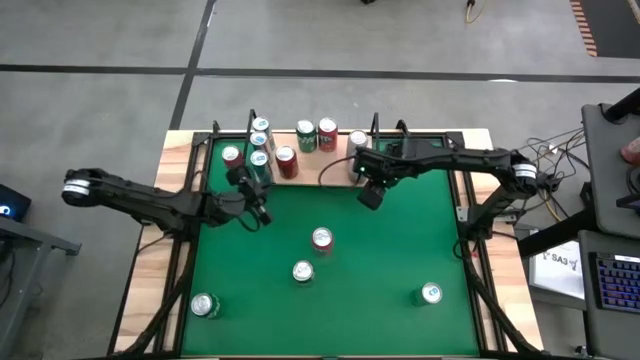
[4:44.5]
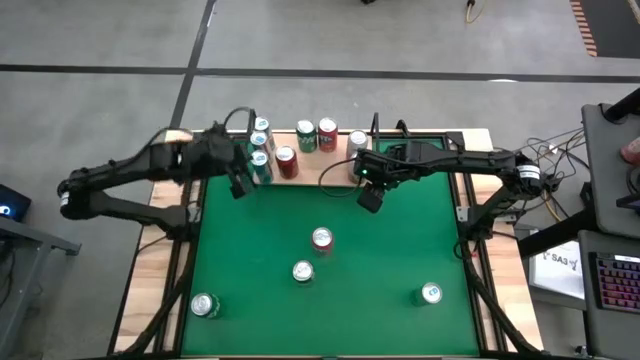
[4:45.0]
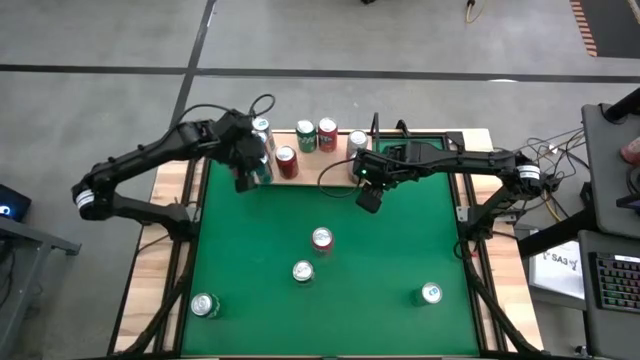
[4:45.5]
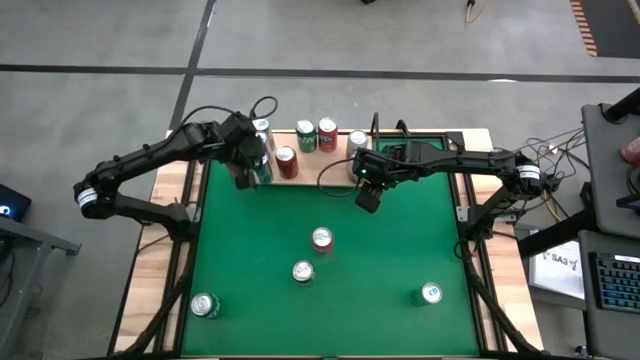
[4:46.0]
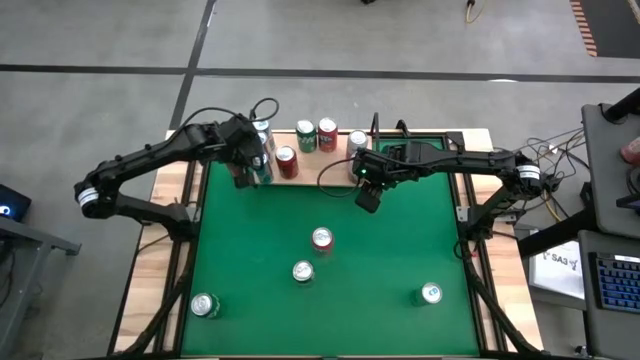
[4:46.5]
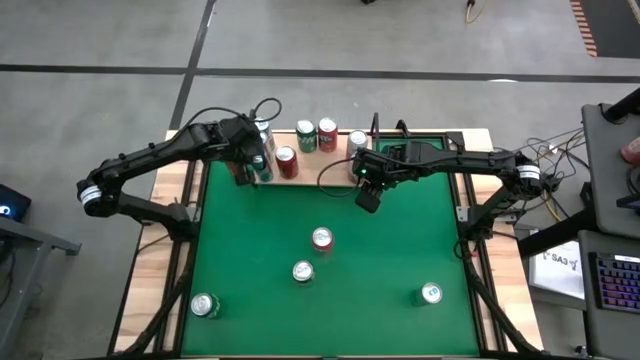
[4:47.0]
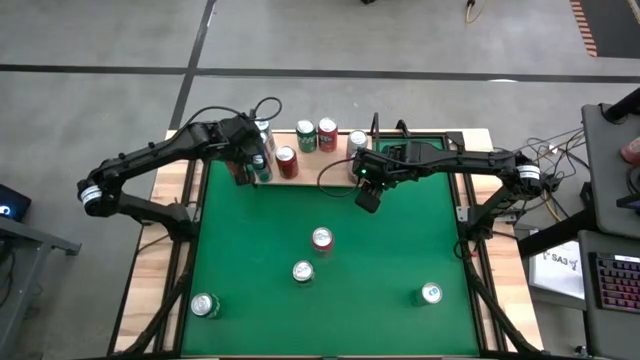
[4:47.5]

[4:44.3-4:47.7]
Task: Pick and place cans onto a shelf
Adjust the blue silver soda can

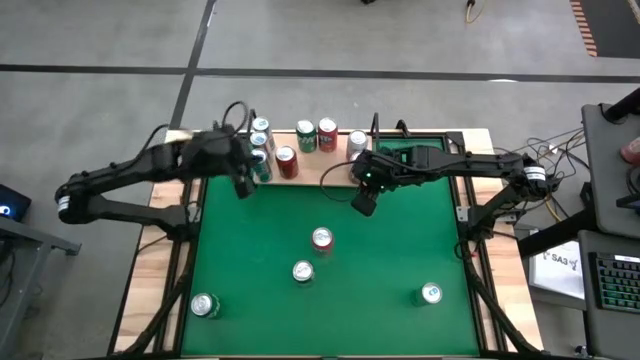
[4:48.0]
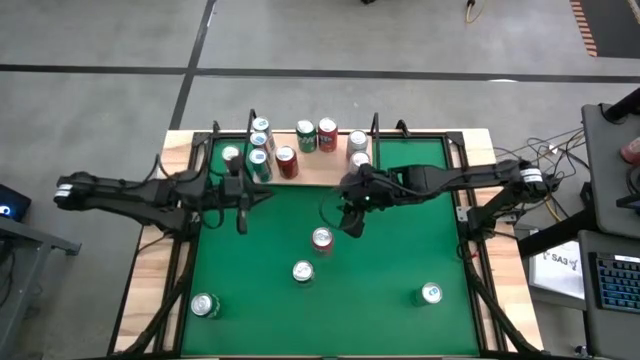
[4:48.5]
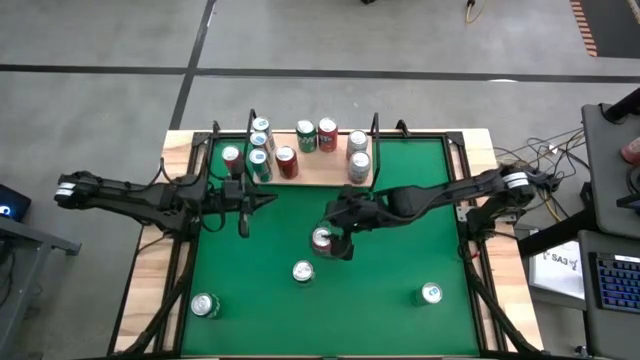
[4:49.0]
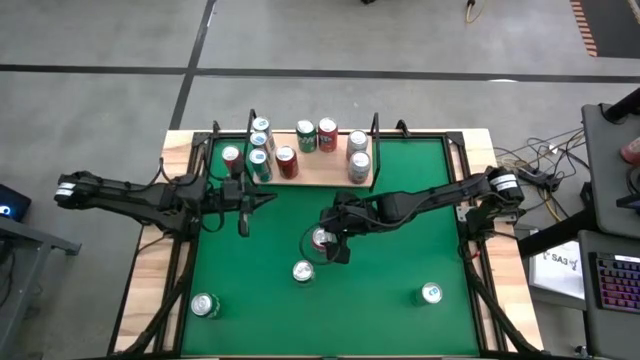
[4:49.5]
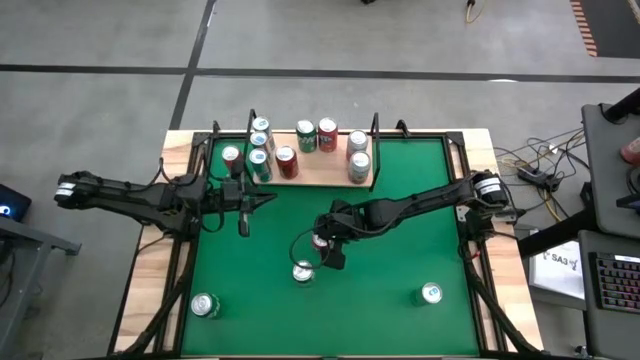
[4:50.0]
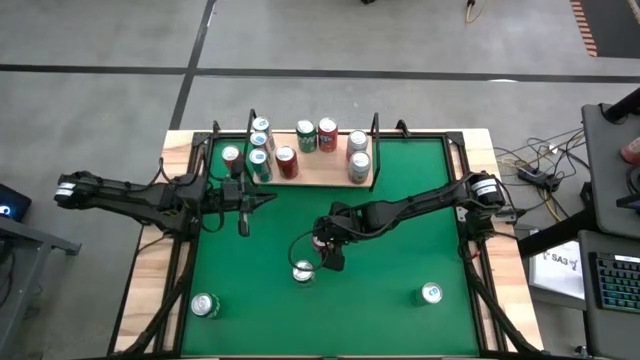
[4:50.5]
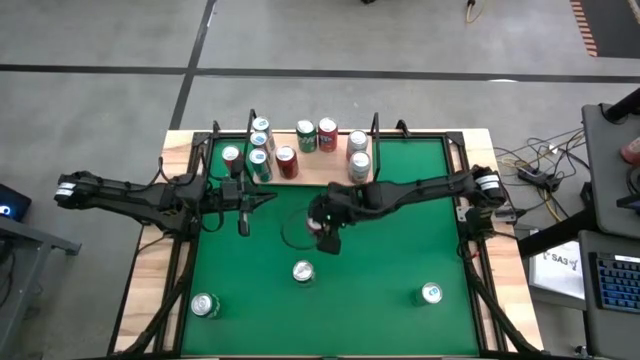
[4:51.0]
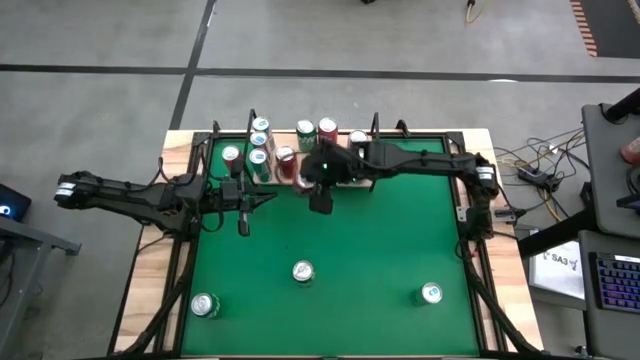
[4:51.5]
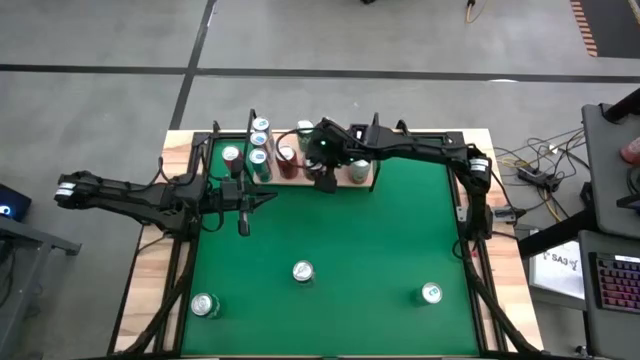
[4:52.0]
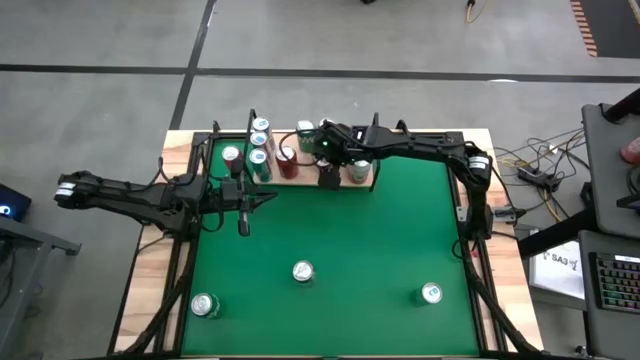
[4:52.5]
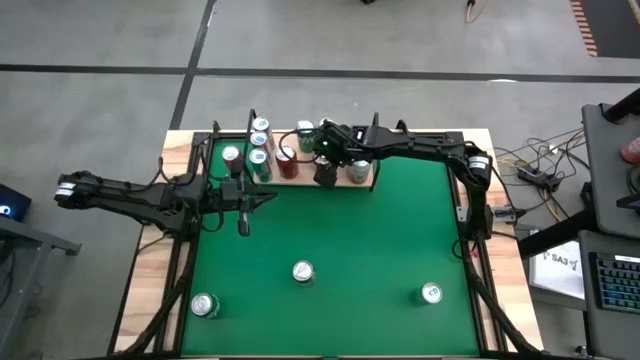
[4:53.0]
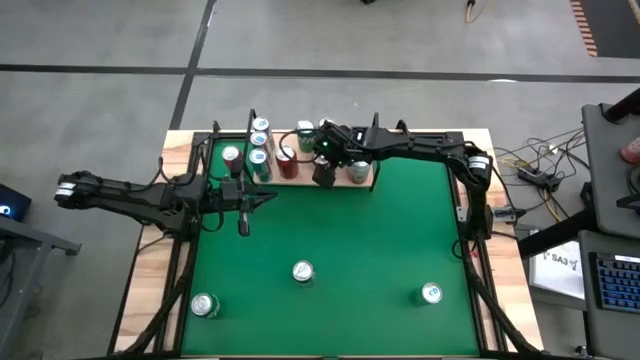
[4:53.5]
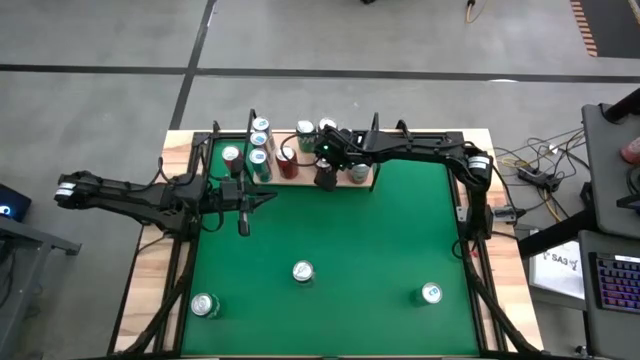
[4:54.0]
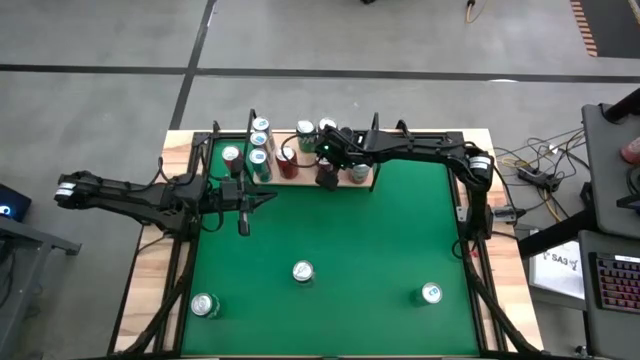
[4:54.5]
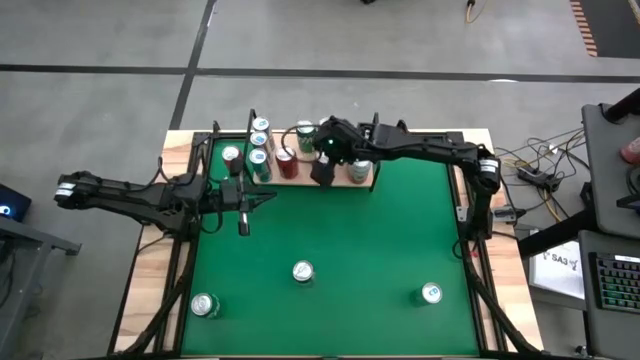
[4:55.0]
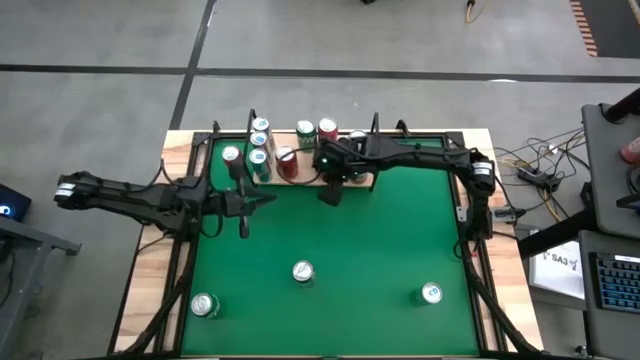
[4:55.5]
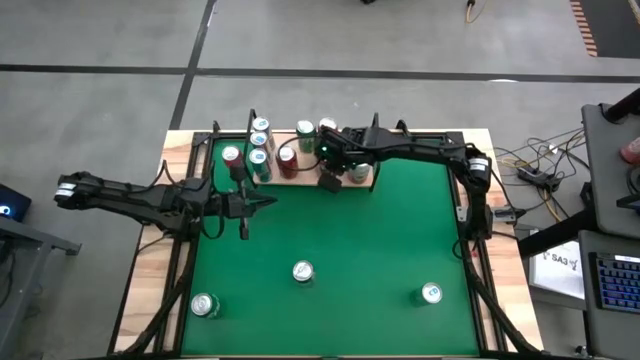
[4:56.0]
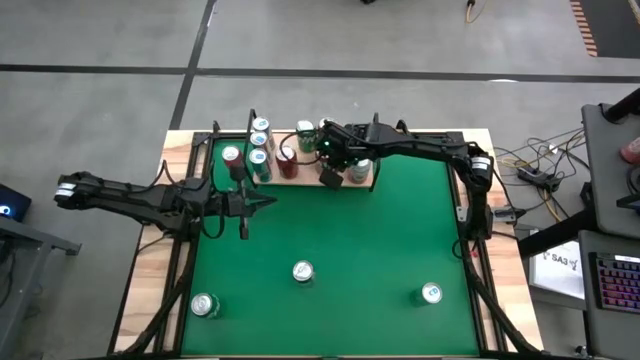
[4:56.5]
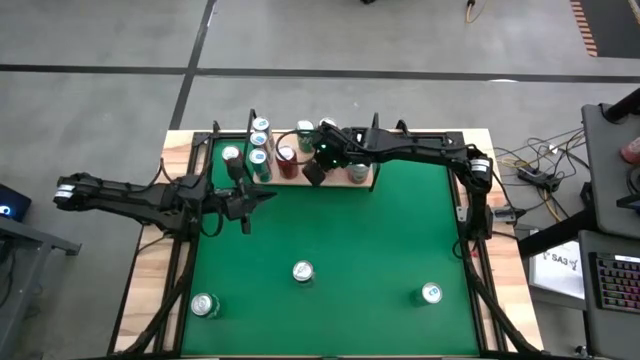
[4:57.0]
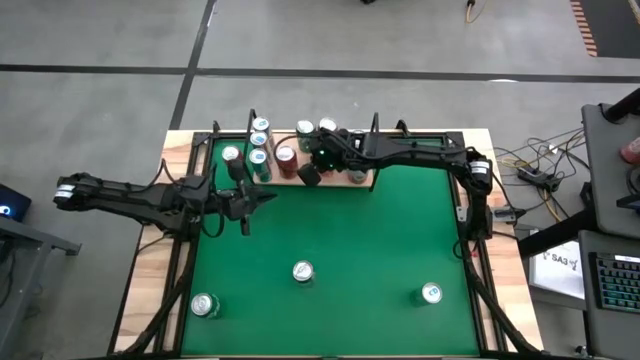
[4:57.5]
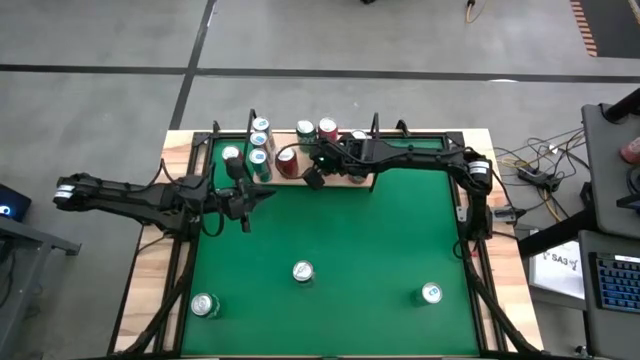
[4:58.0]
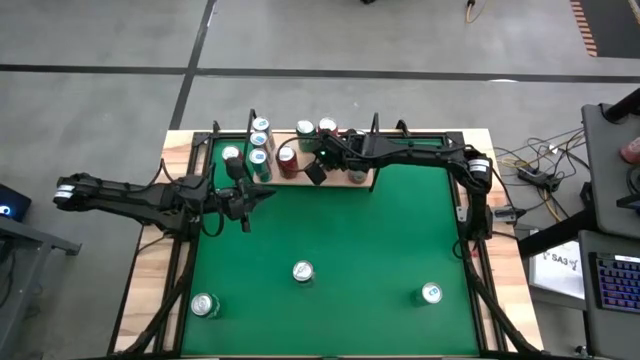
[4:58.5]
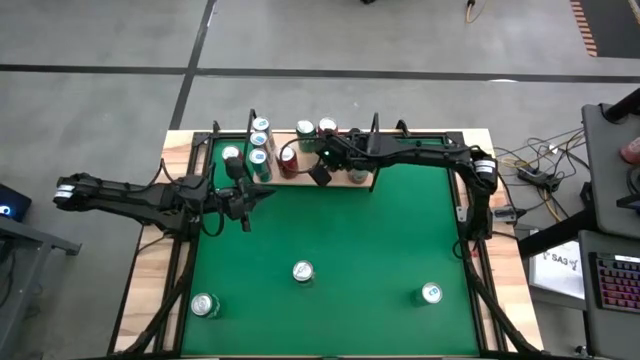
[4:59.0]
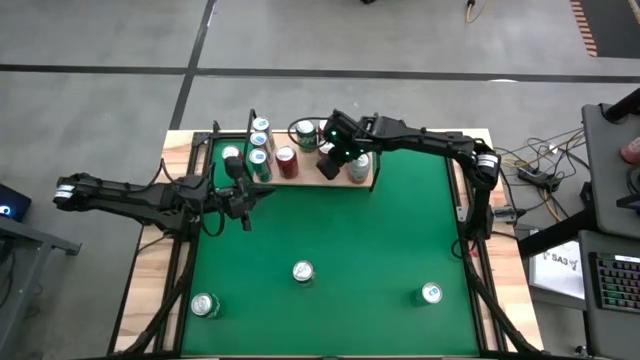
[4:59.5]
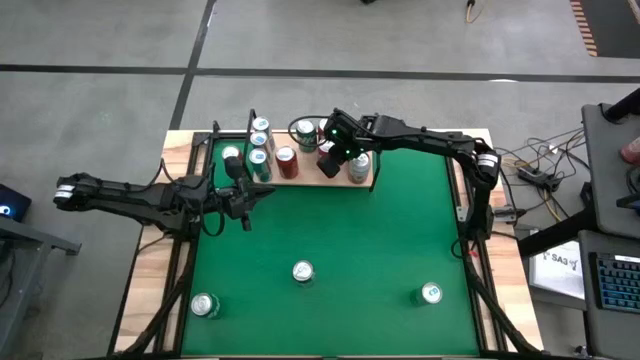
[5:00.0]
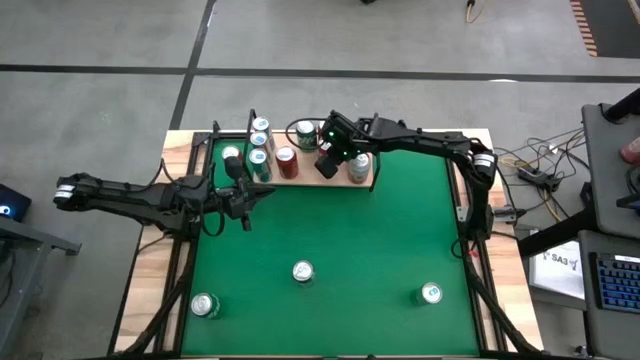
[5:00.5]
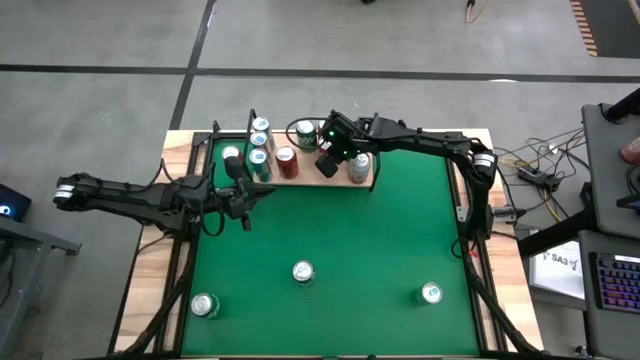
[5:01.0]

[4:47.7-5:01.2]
Put the bottom orange soda can on the shelf aligned with the other orange soda can

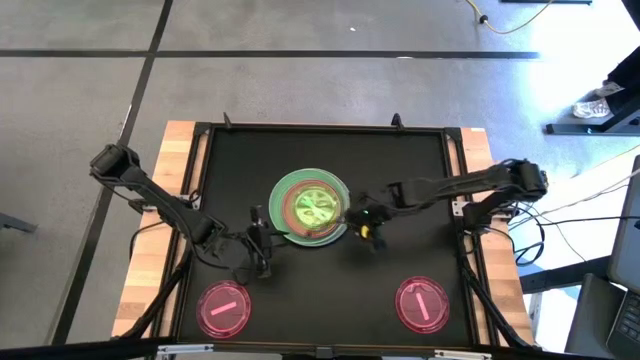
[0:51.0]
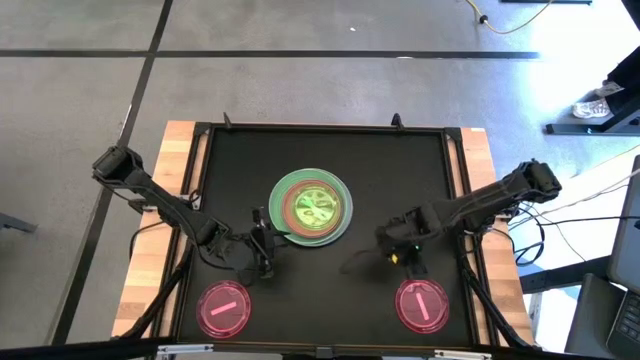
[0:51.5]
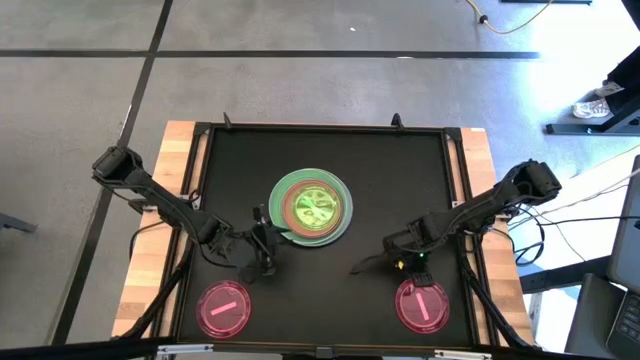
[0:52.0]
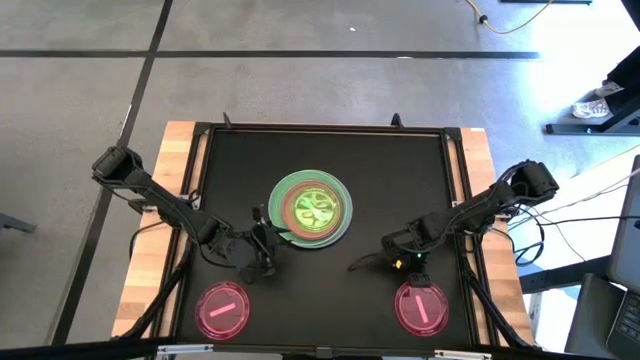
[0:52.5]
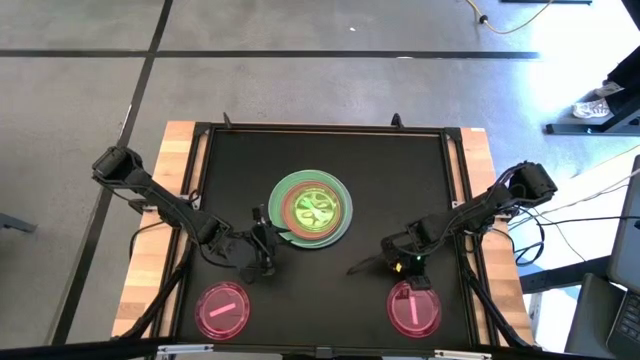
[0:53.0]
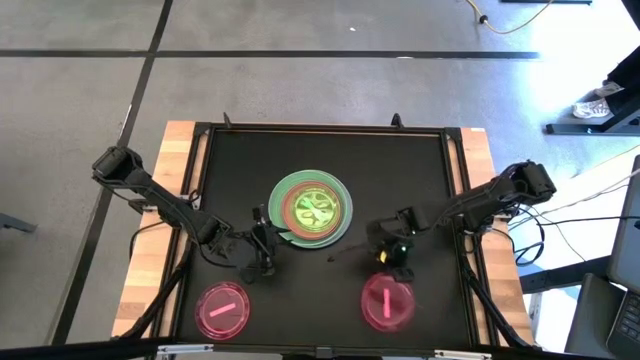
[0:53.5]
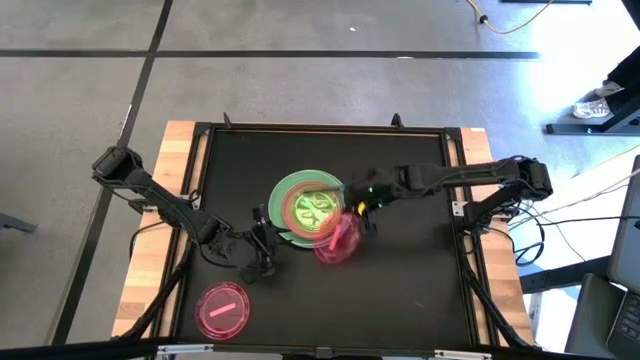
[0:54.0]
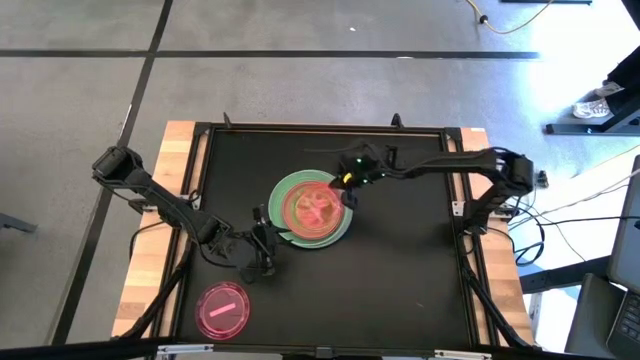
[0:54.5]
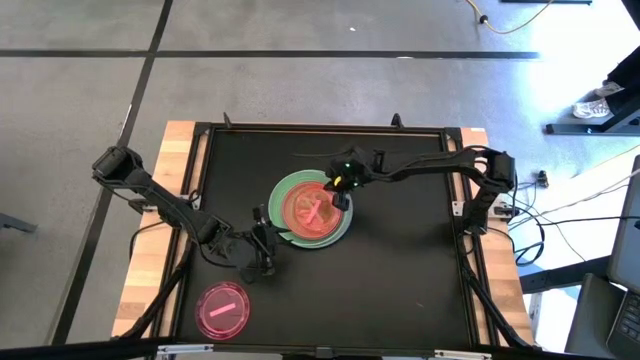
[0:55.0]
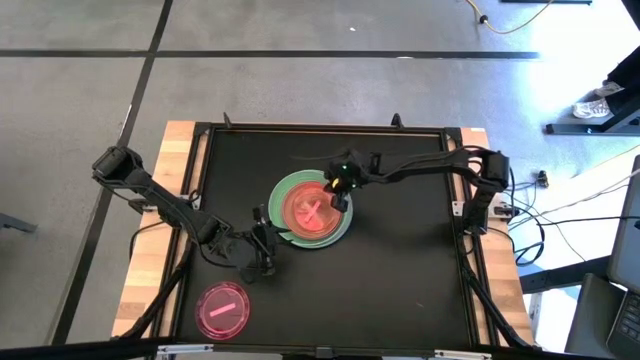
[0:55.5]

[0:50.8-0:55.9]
Task: Stack plastic plates
Stack the right red plate on the light green plate
